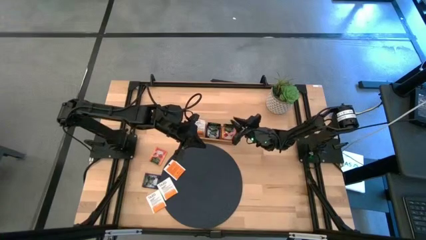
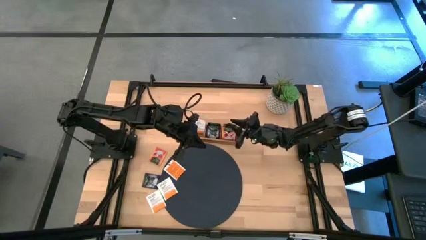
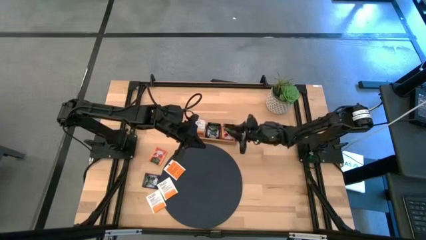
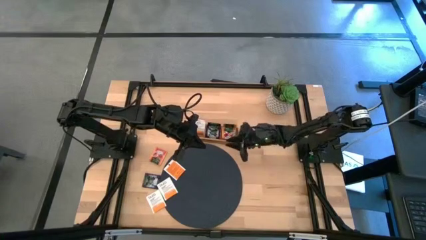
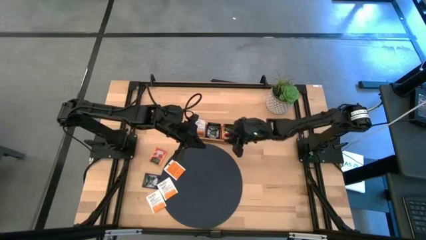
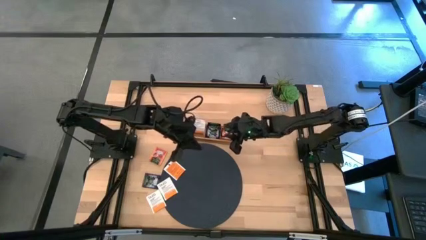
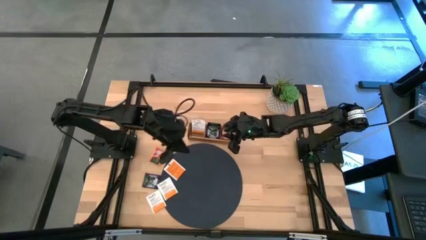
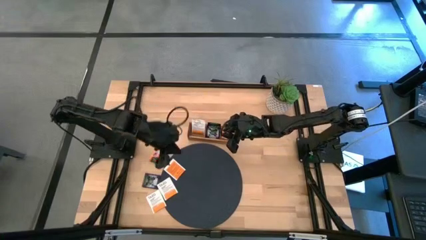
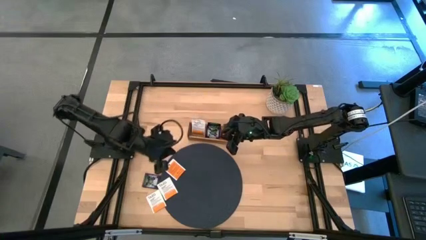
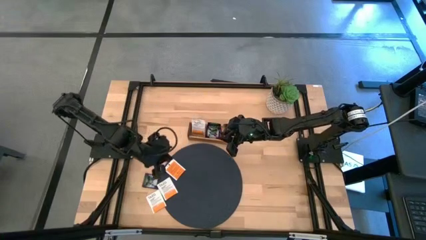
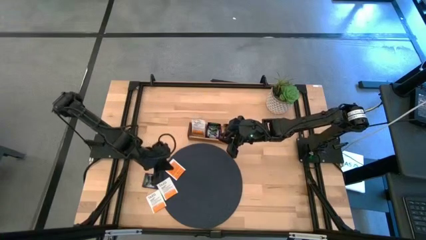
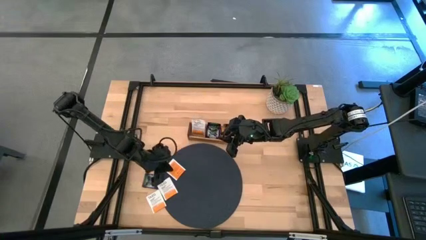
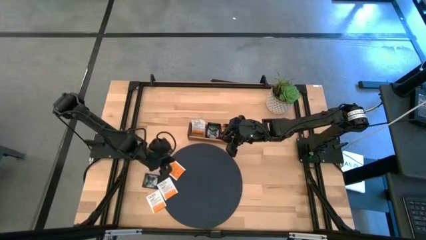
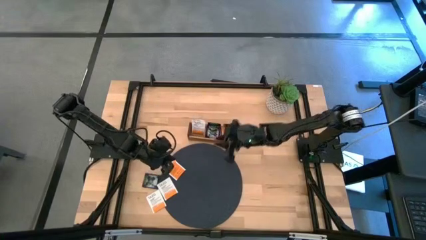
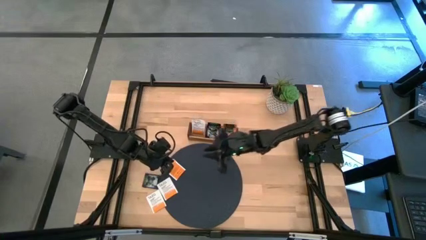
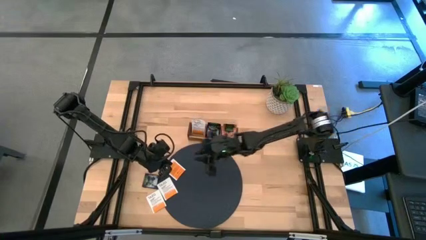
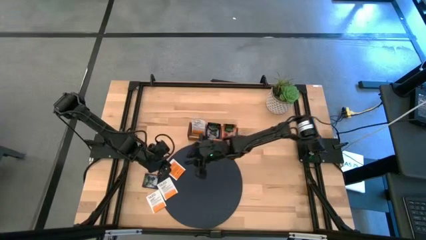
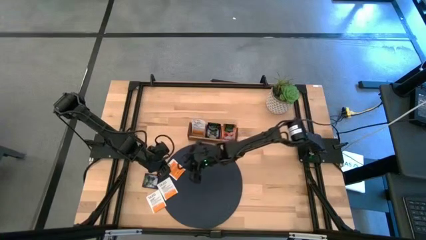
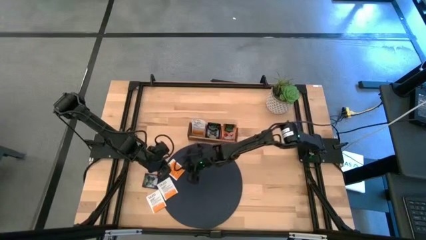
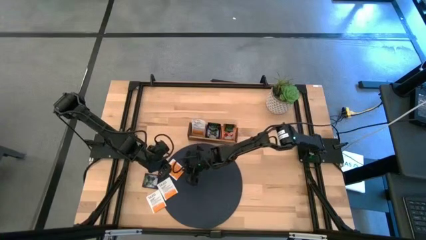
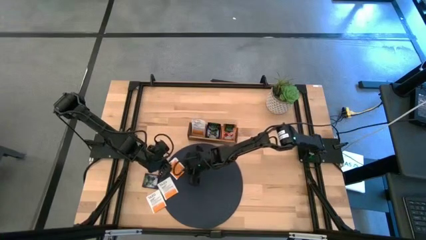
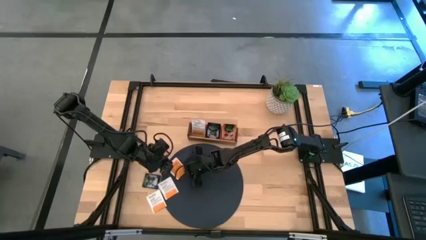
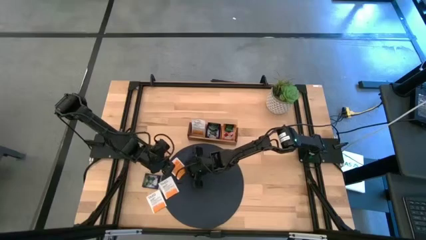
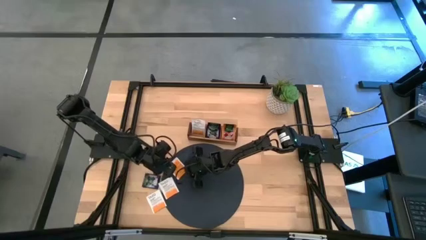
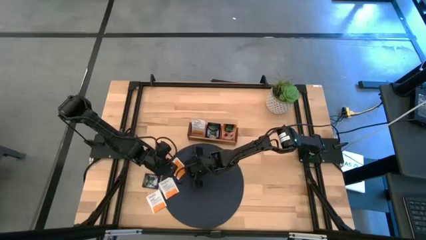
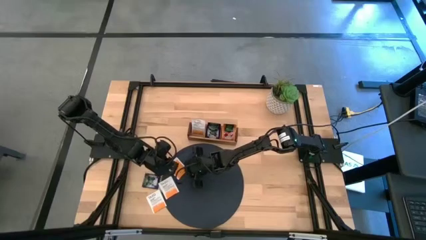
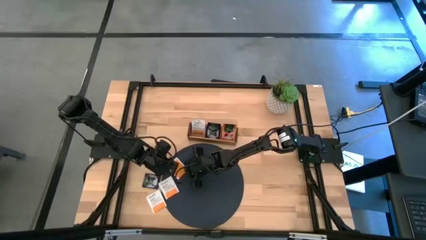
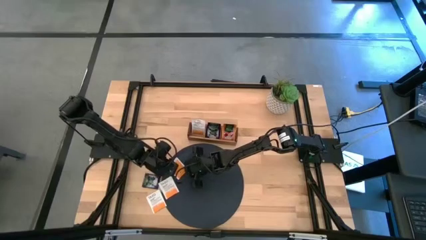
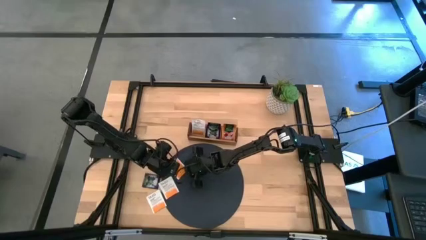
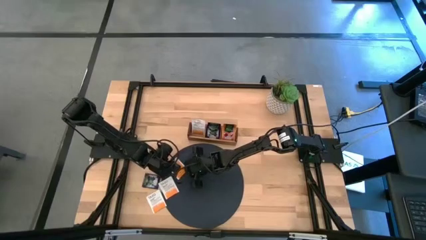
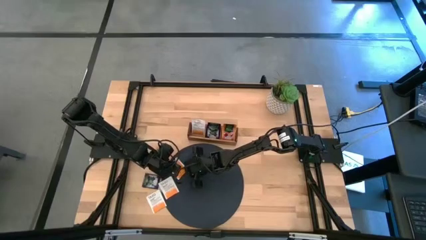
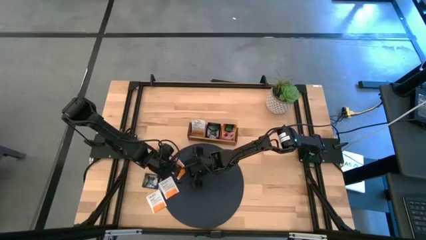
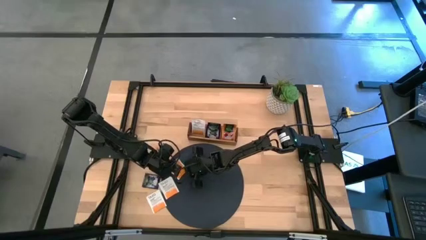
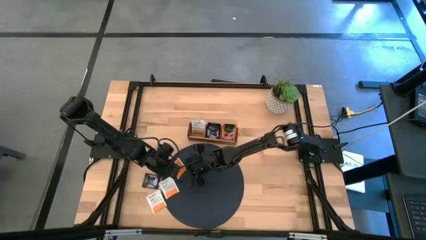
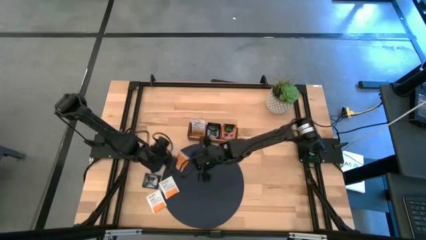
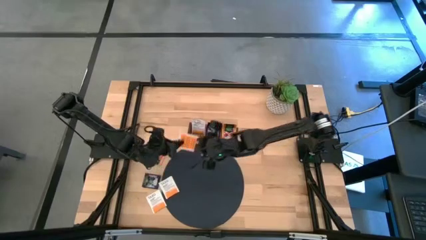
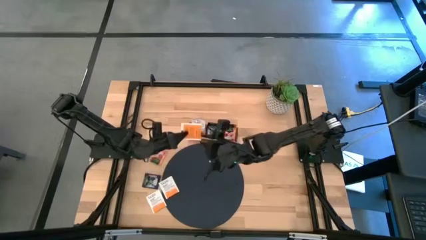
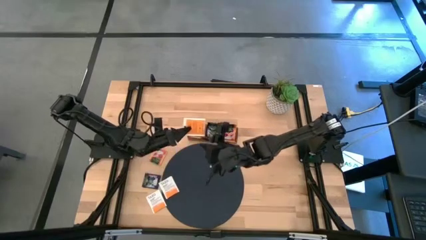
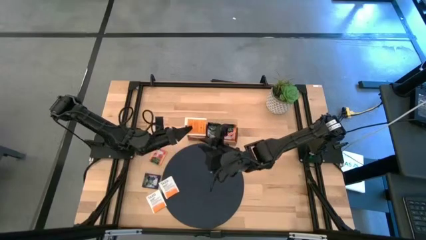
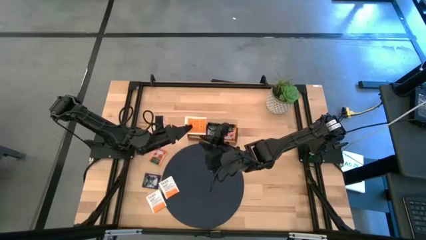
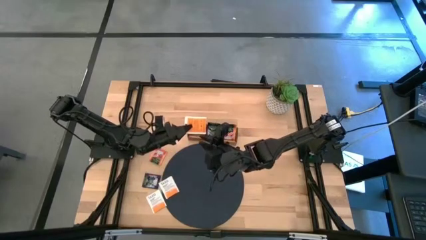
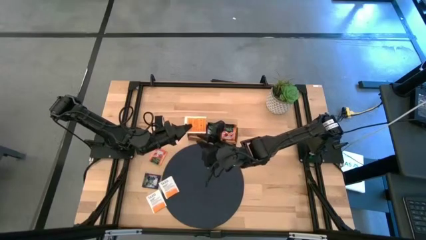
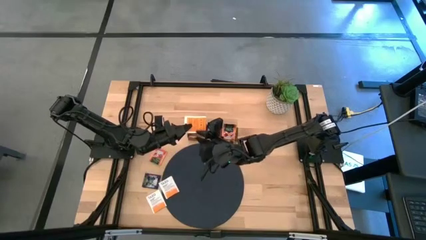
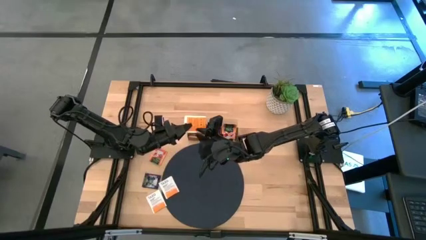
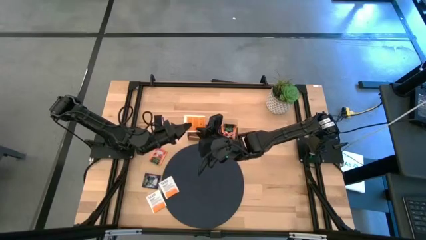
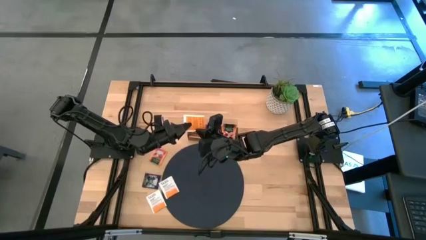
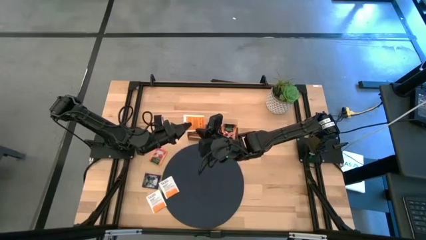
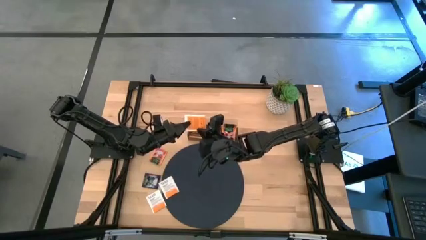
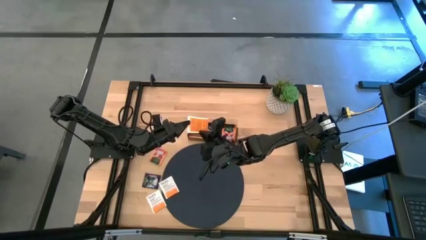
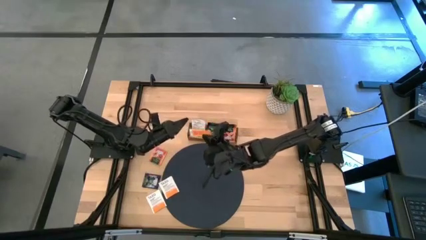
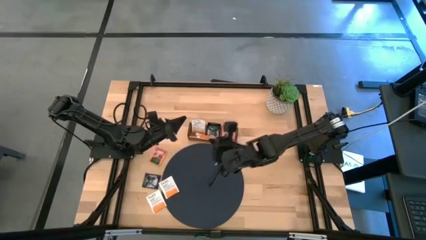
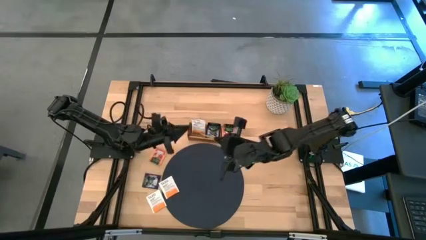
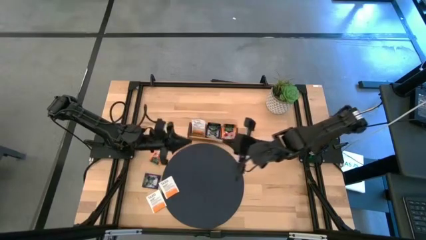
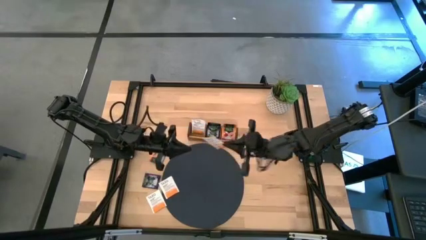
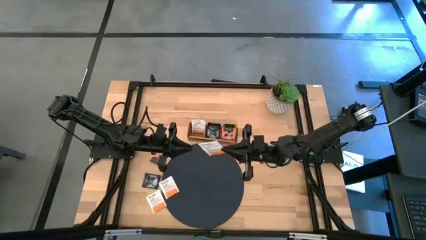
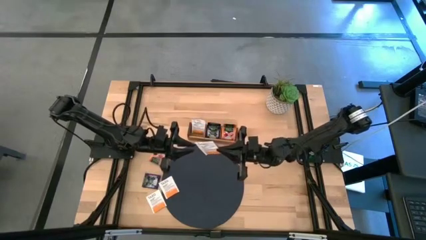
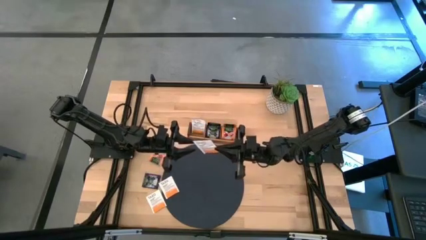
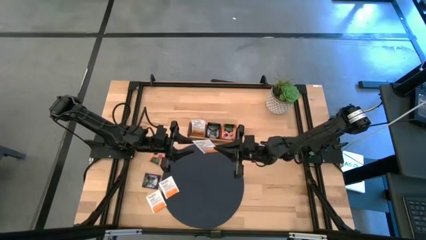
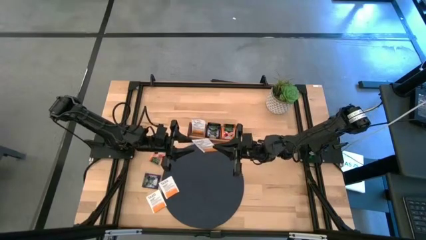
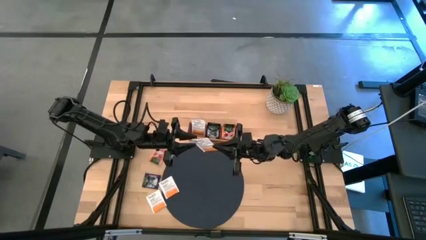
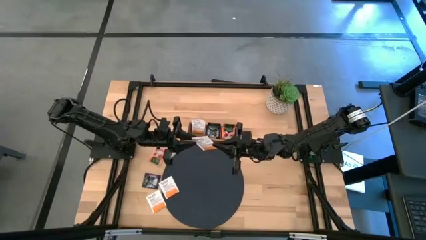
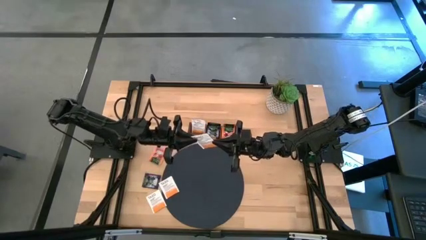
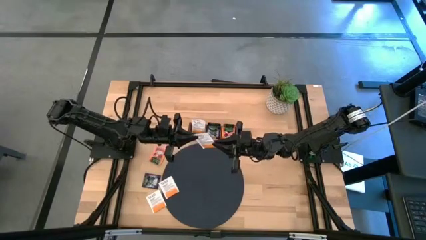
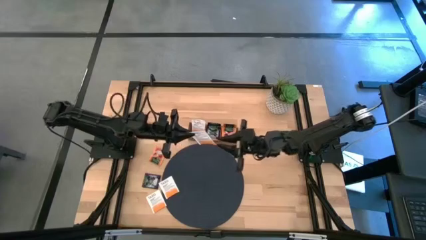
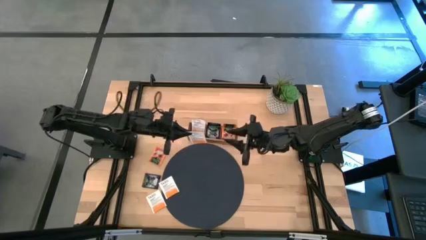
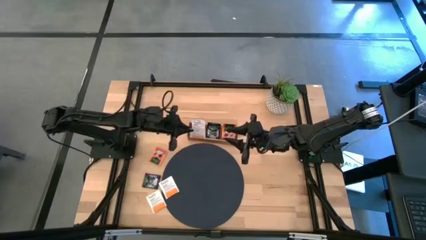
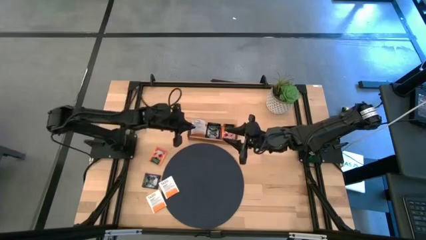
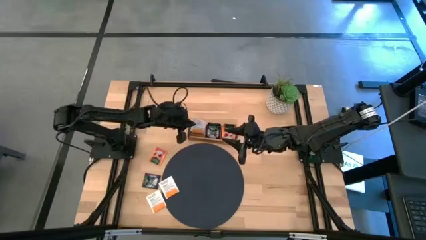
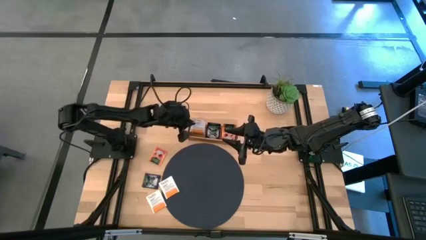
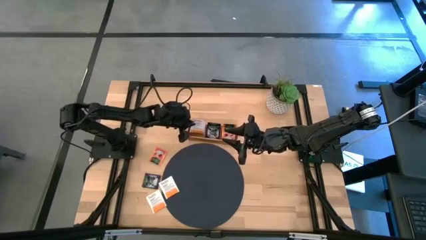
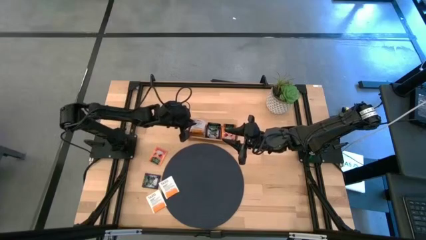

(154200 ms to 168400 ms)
Task: Pick & Place Tea
Put the white tea bag into the left of the wooden organizer

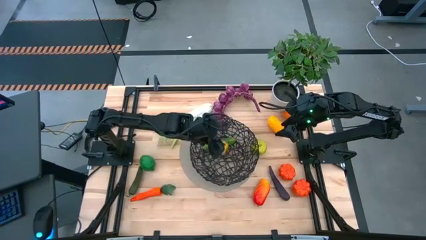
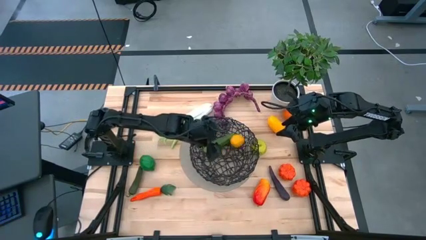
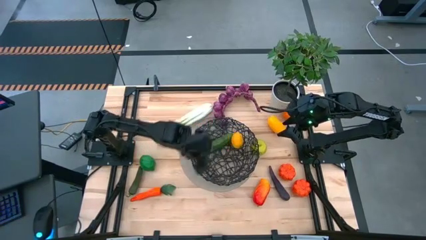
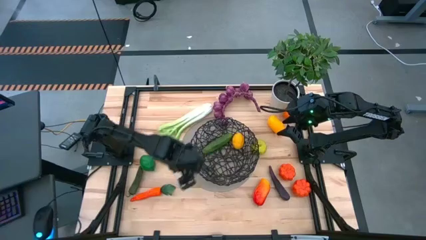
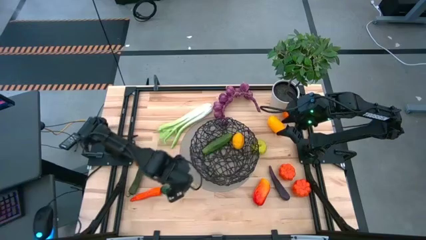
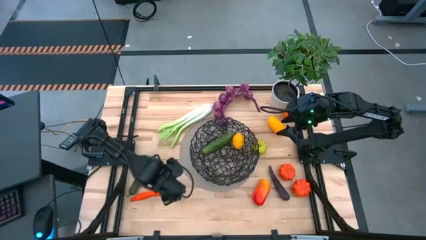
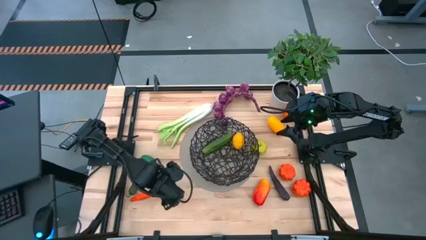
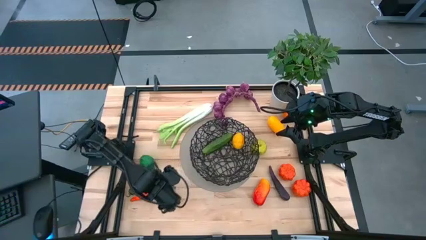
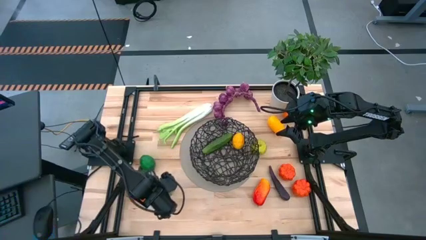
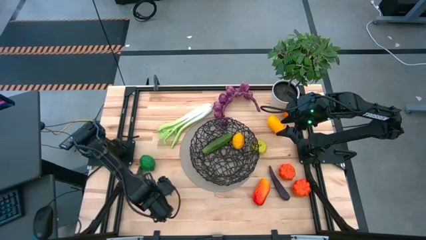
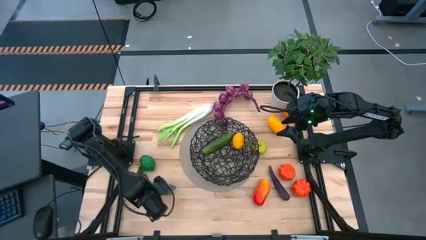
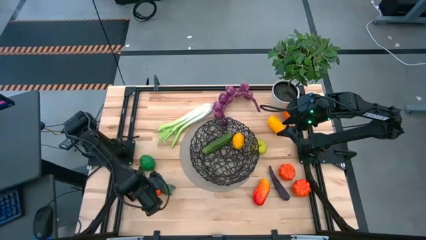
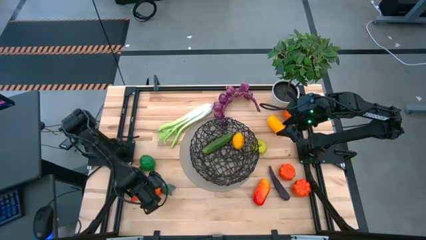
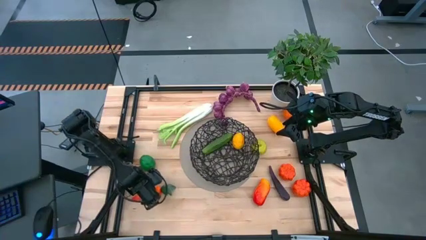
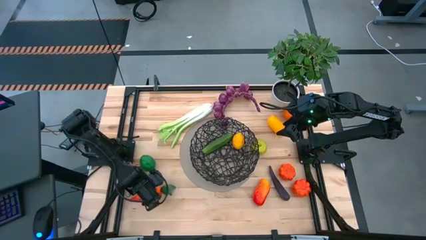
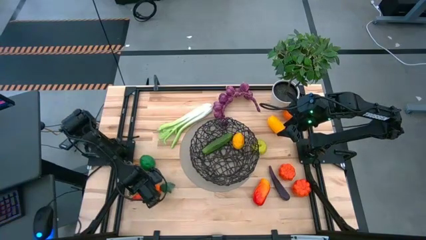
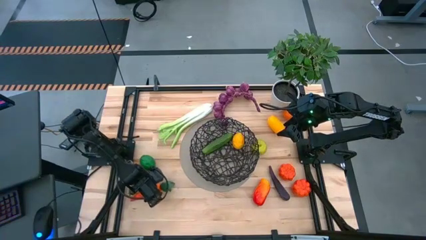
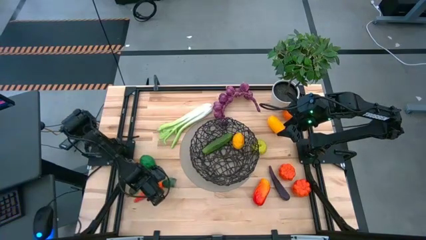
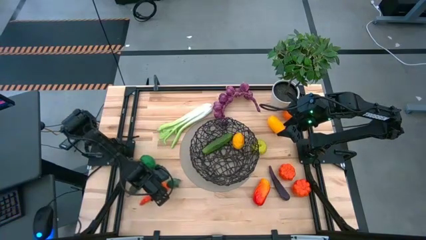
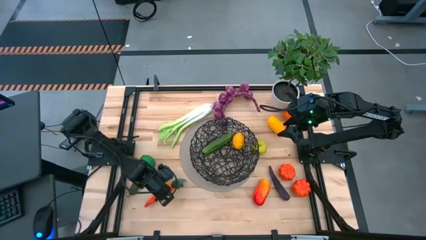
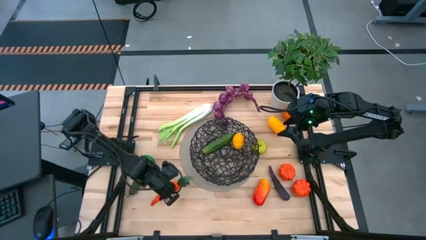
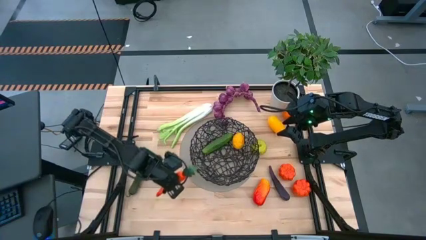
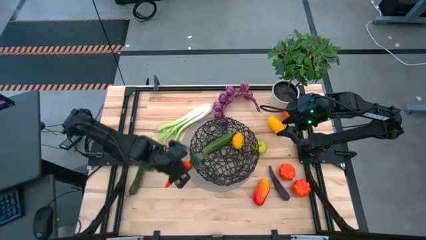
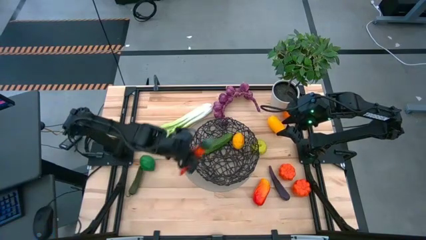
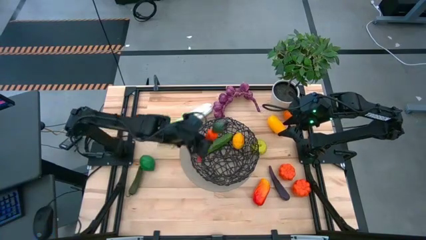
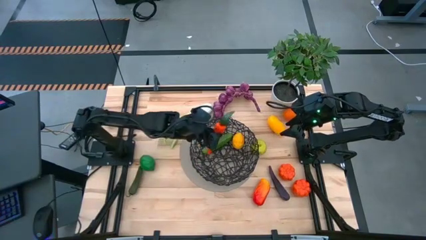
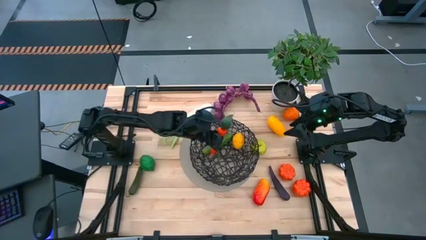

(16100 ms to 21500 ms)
Task: Build produce basket
Put the orange carrot into the black wire basket
